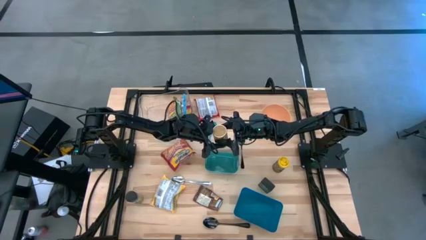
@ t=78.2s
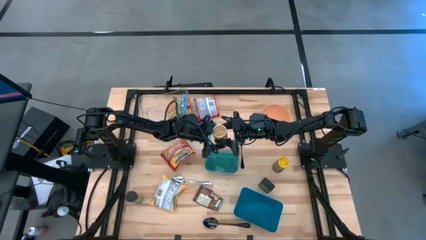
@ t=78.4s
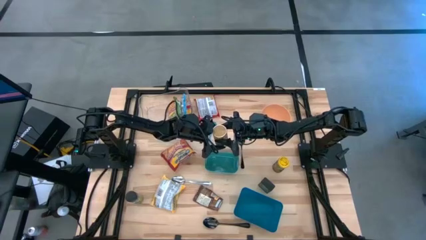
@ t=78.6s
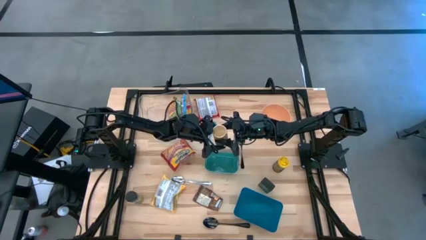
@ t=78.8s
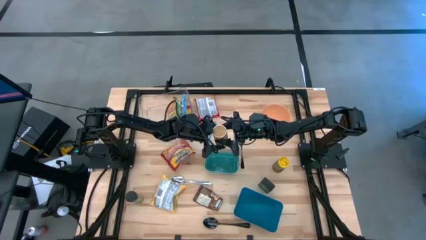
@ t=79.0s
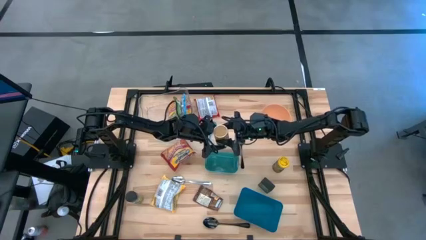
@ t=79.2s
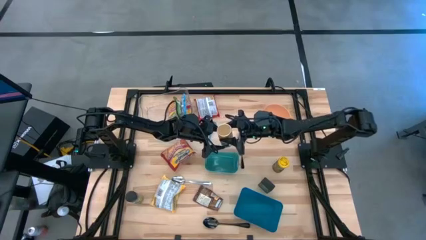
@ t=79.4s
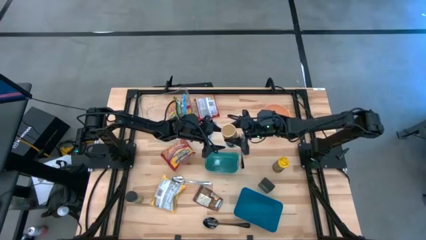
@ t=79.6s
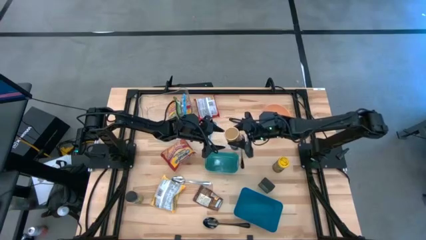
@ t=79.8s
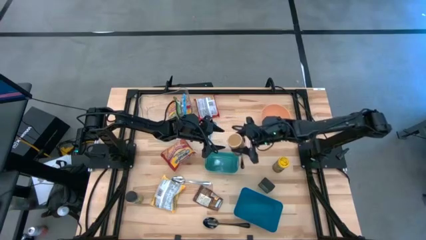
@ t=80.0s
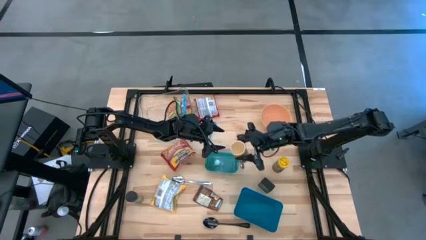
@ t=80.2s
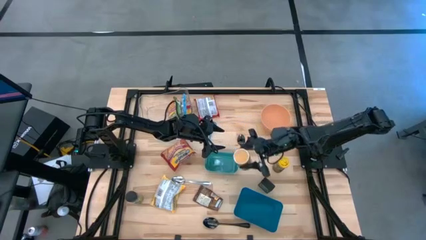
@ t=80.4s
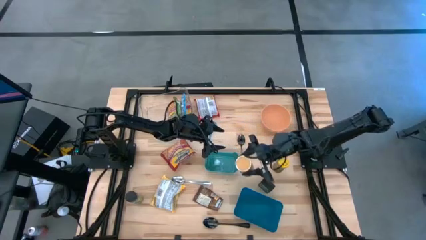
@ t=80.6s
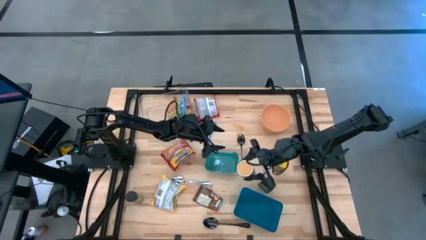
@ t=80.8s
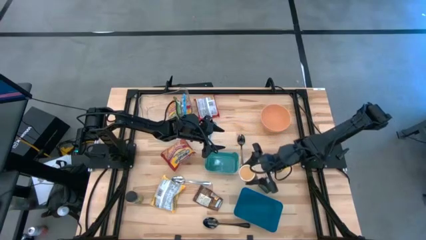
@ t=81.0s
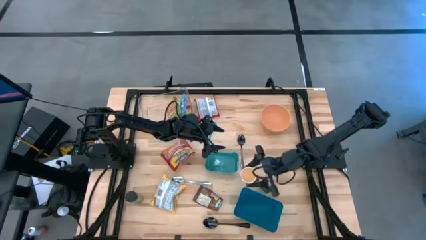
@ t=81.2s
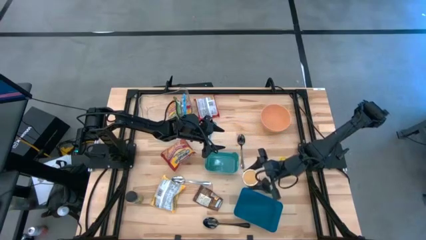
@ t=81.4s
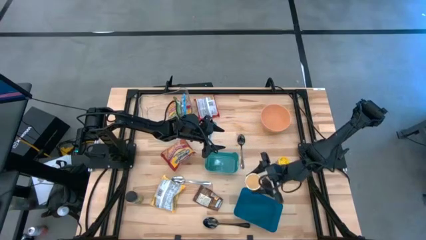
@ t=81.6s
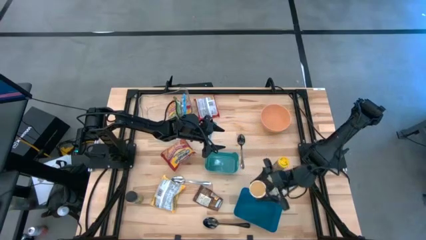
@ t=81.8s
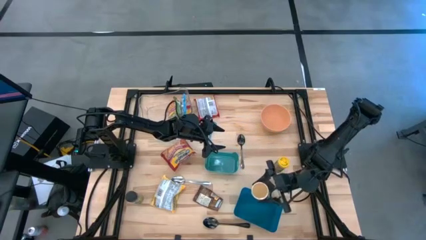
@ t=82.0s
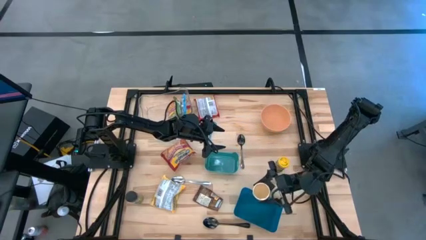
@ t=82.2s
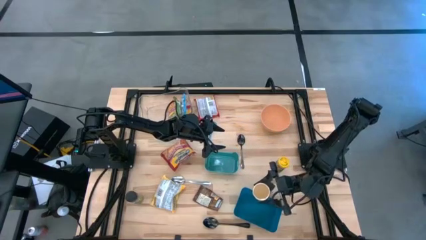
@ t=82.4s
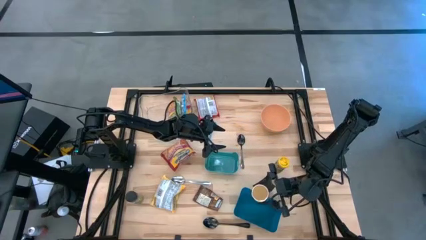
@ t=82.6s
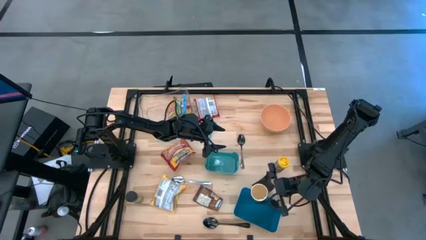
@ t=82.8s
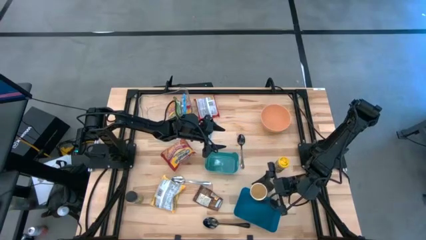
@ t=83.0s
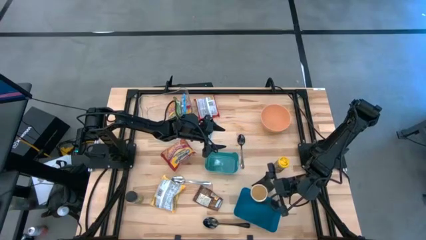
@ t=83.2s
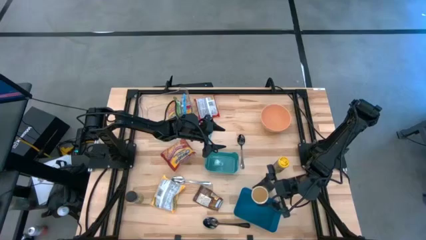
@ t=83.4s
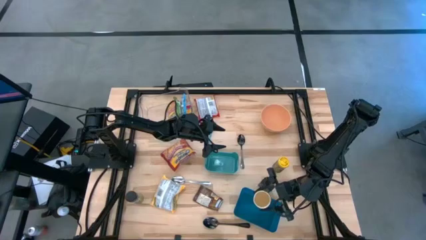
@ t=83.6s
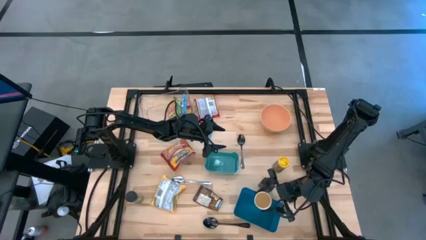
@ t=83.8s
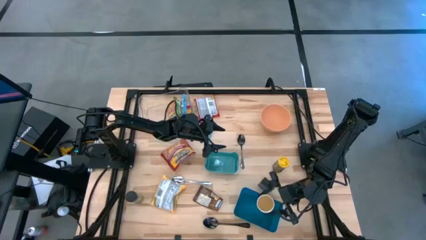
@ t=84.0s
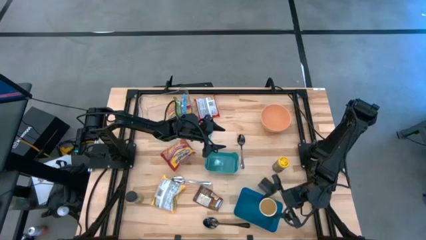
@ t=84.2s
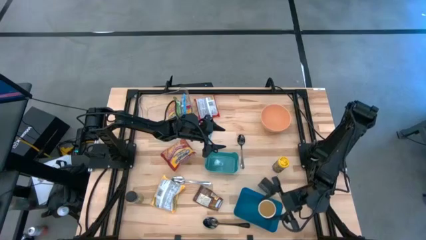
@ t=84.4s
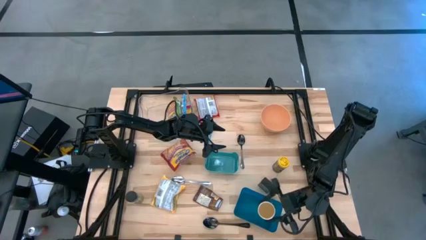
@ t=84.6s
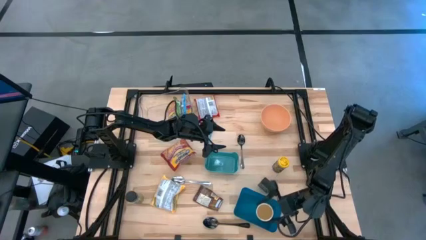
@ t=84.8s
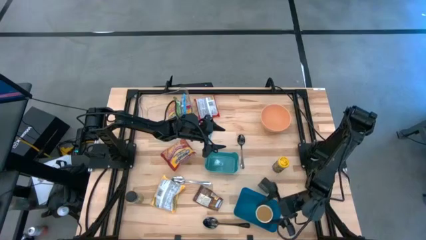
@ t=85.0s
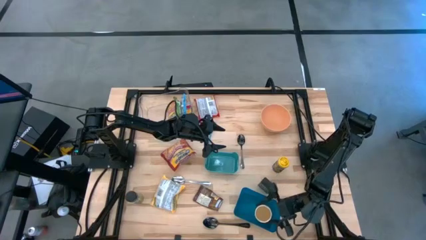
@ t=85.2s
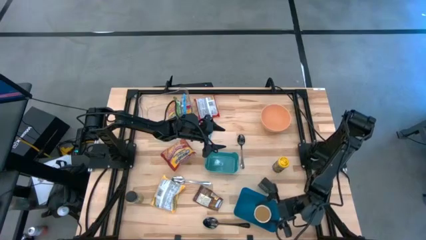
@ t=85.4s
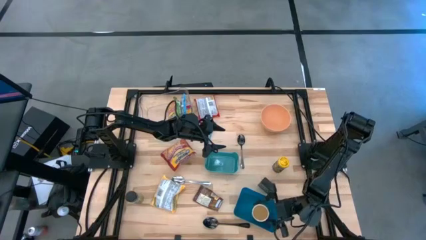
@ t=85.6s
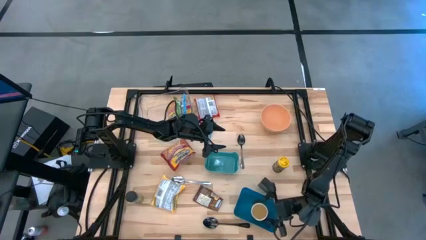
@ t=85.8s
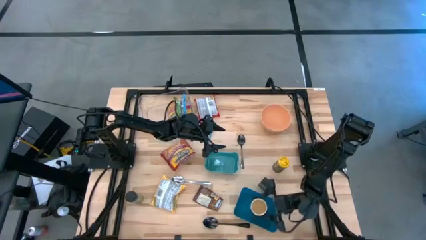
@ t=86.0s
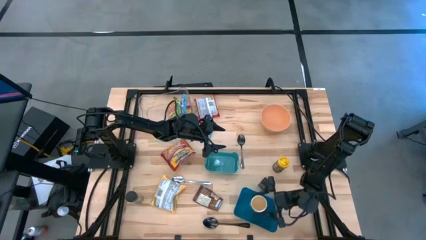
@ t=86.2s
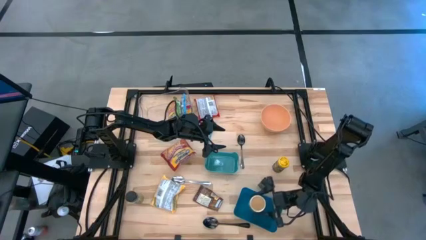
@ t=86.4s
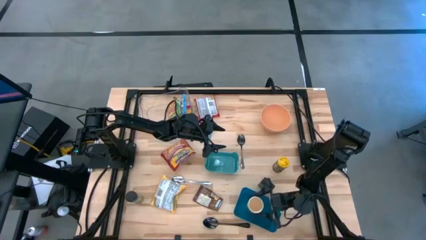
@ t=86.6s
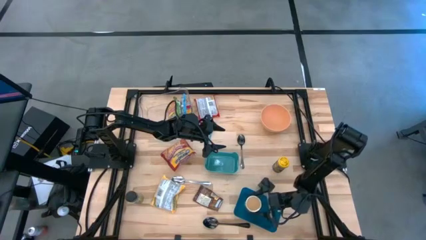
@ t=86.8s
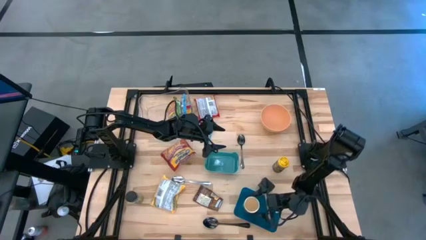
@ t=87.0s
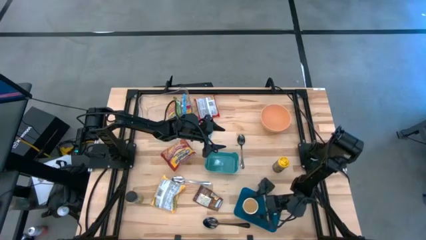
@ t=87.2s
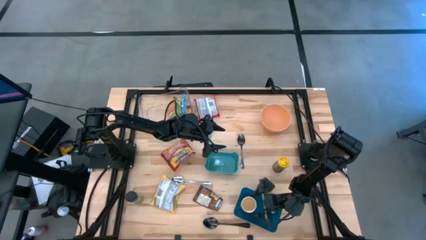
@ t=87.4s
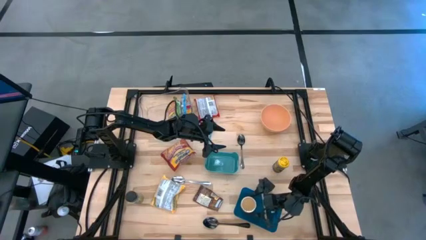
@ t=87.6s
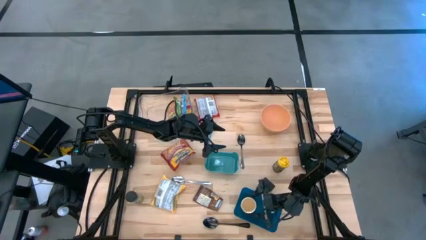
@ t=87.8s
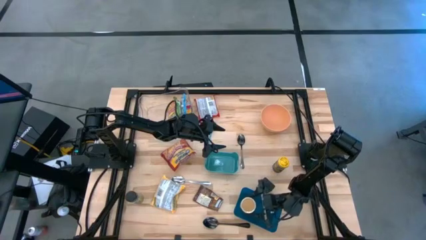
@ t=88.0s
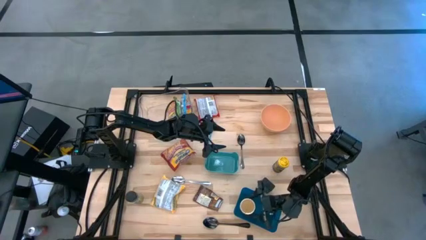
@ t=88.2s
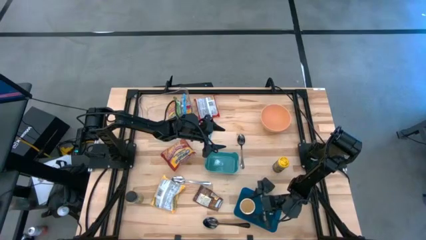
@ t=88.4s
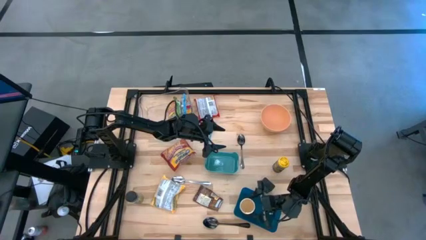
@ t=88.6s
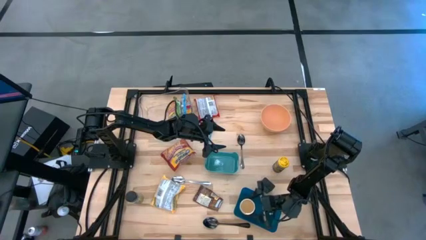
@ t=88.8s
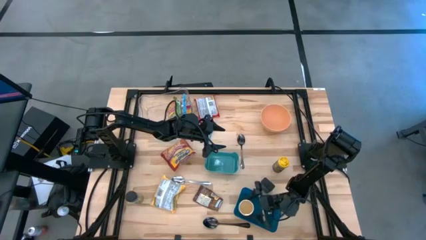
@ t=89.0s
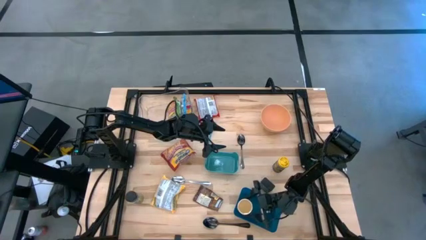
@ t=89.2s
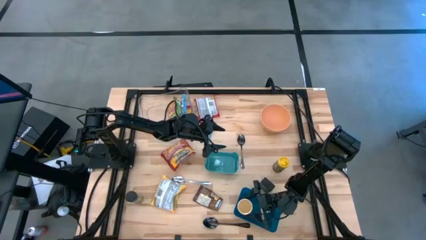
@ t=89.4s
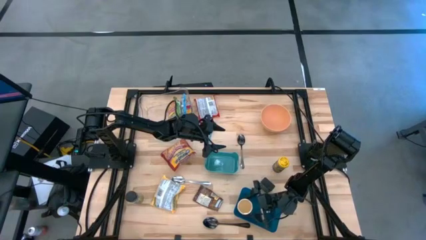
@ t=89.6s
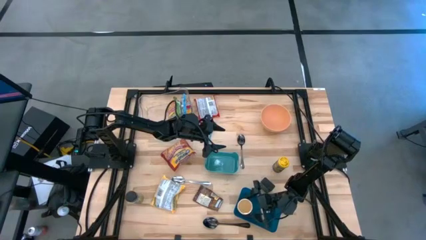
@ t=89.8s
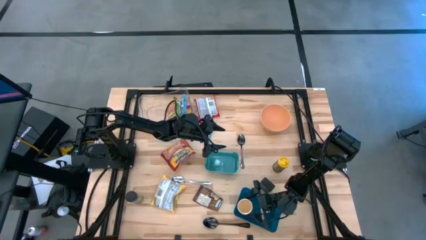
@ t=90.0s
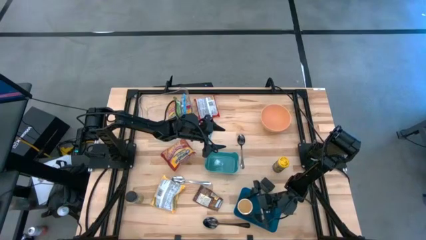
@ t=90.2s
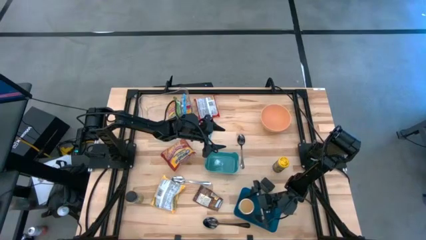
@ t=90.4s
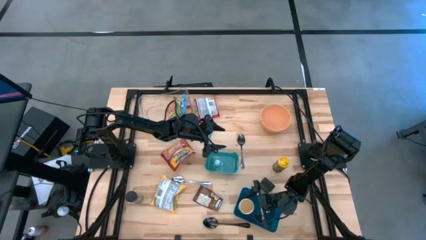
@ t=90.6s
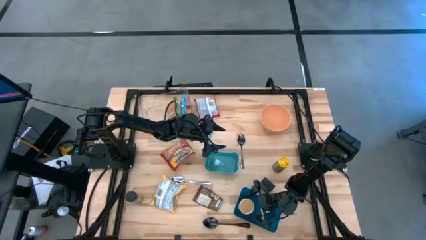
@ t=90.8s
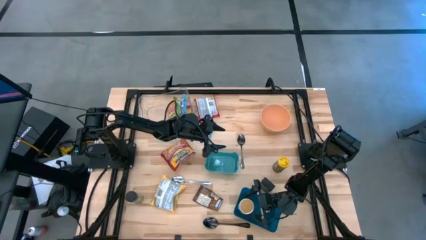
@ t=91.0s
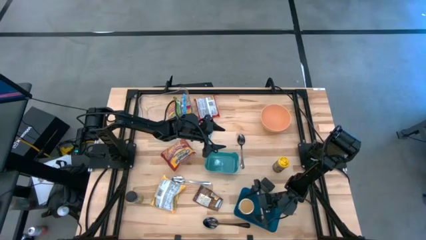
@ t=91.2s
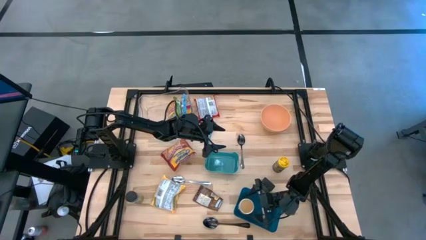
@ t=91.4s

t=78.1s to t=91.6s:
Task: Pick & Place Food Item
Put the gold seasoning bottle into the blue bin
